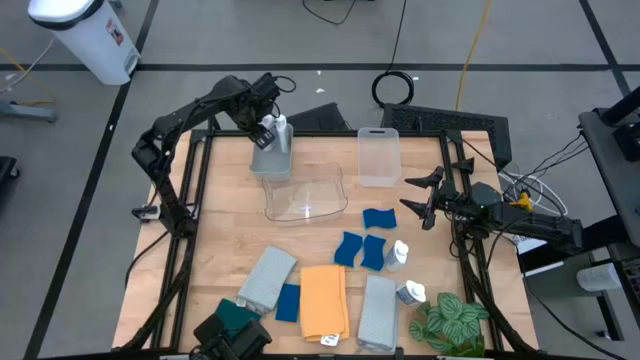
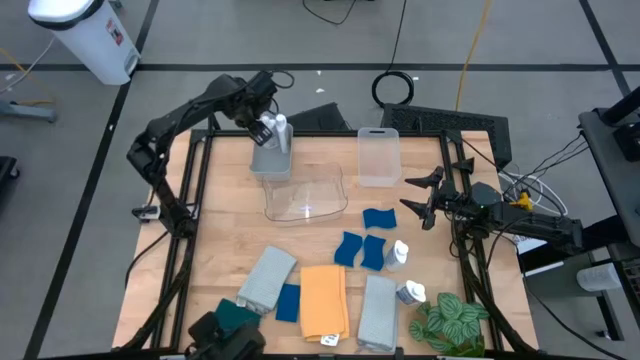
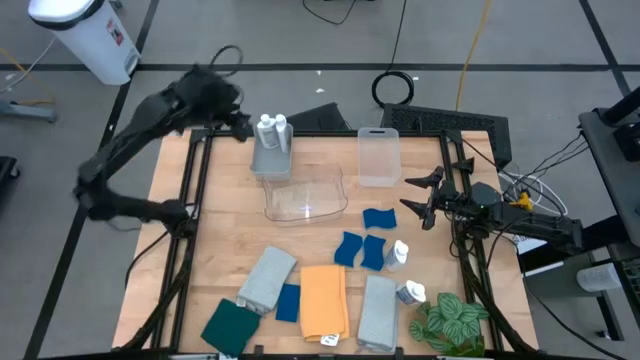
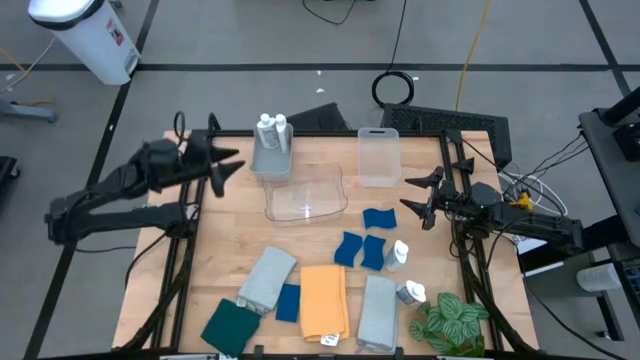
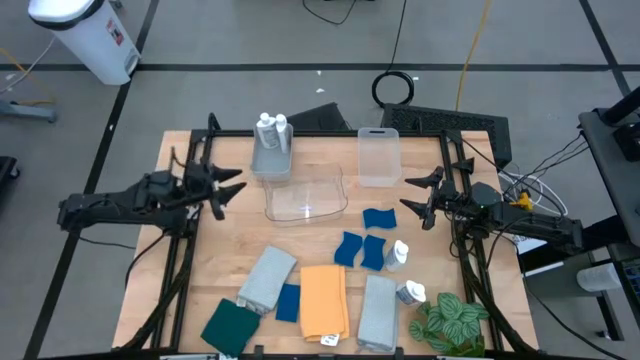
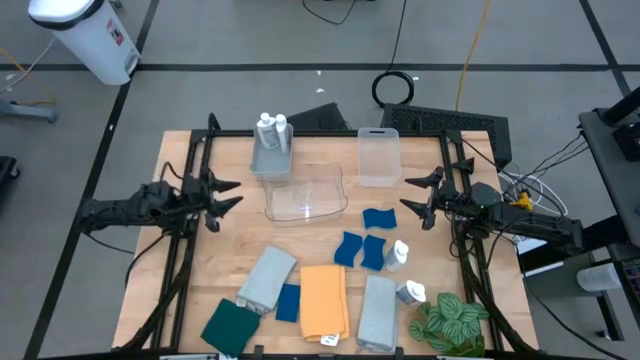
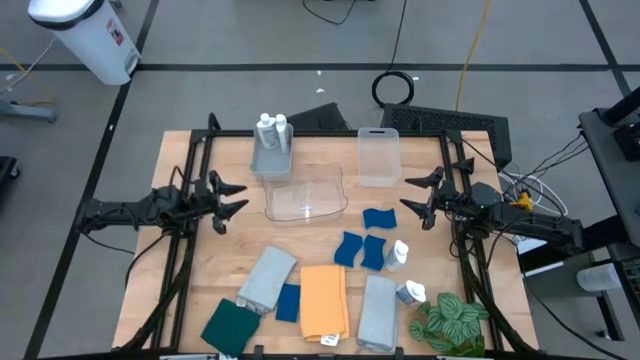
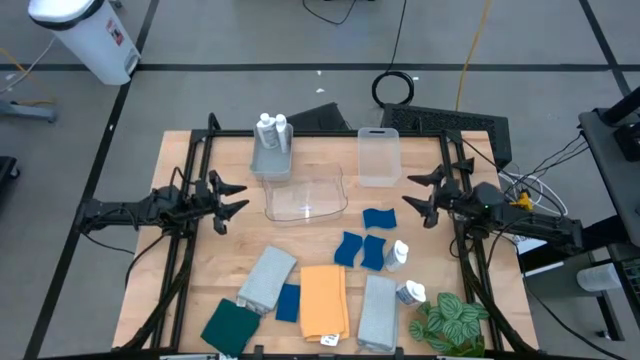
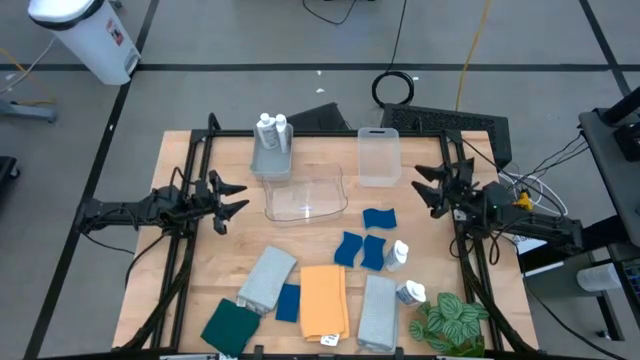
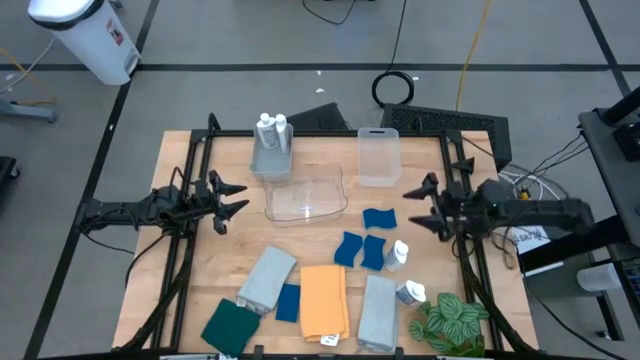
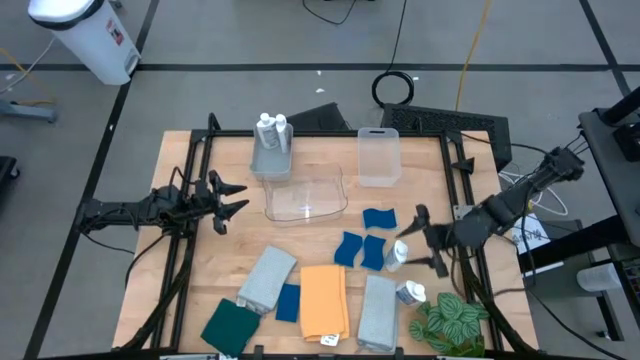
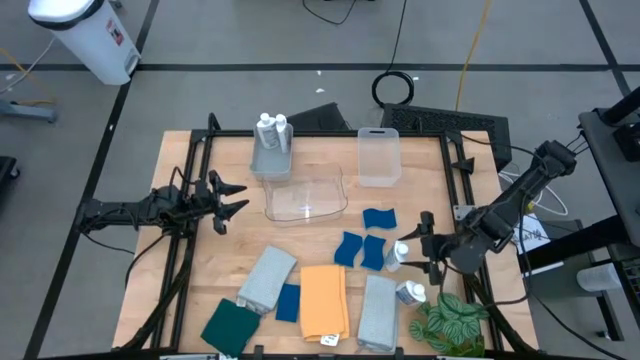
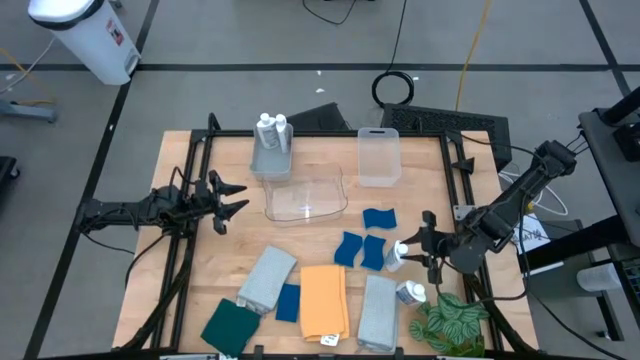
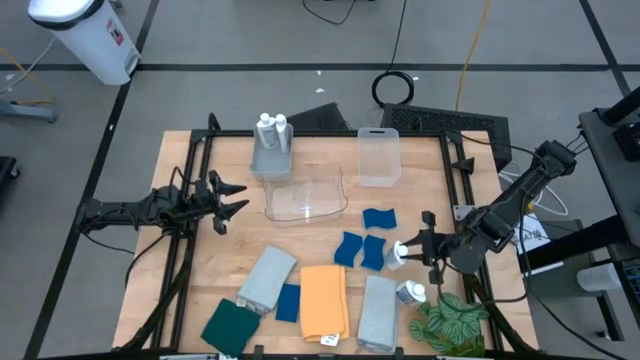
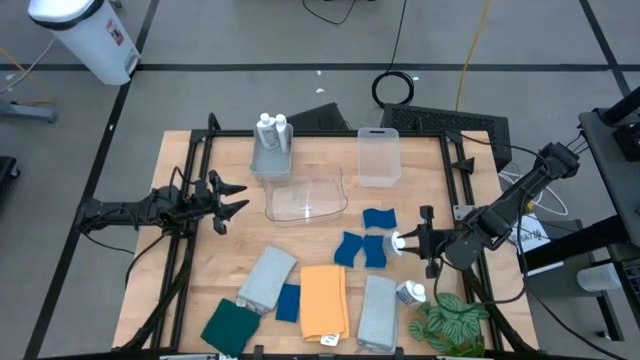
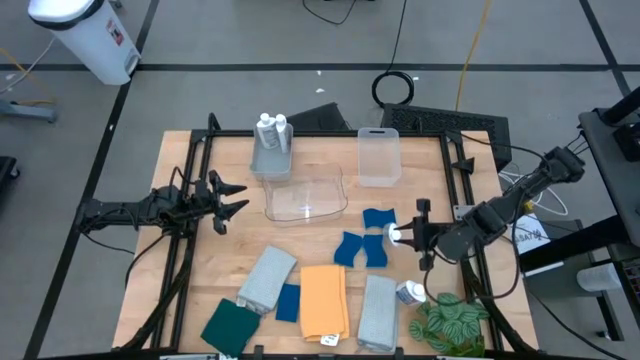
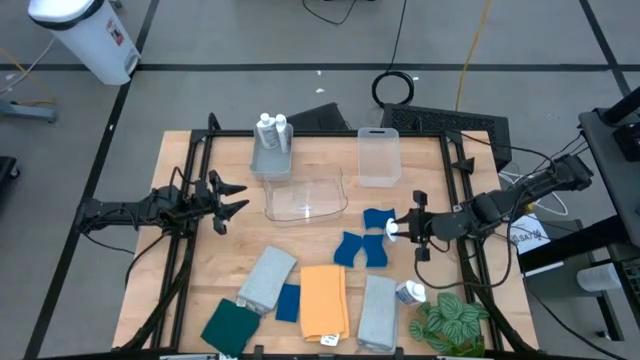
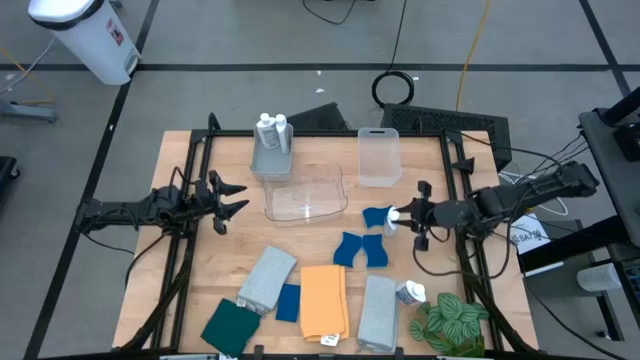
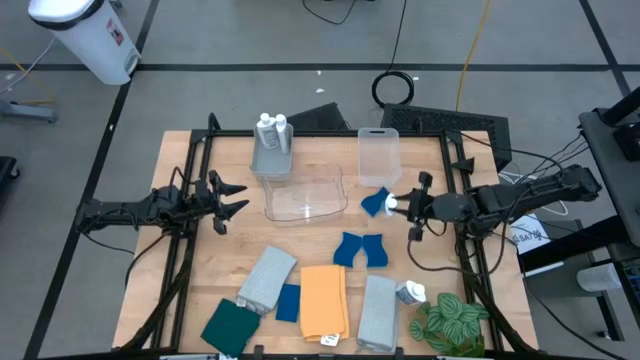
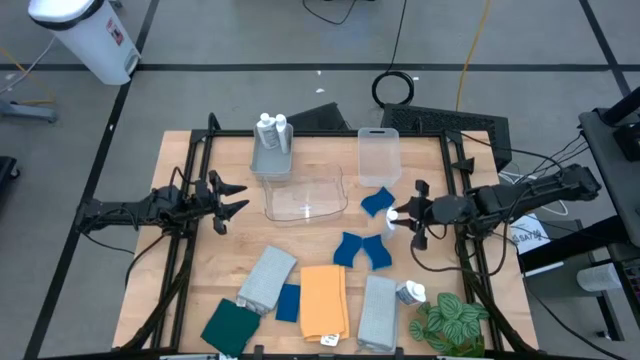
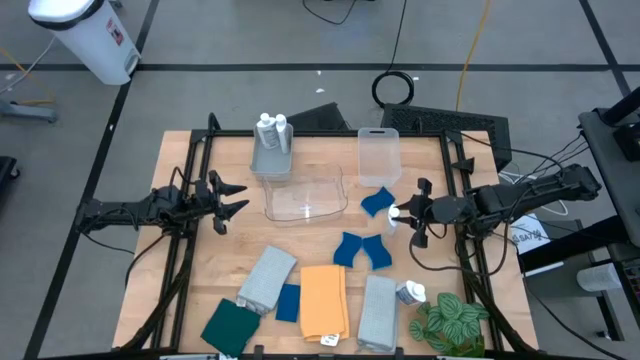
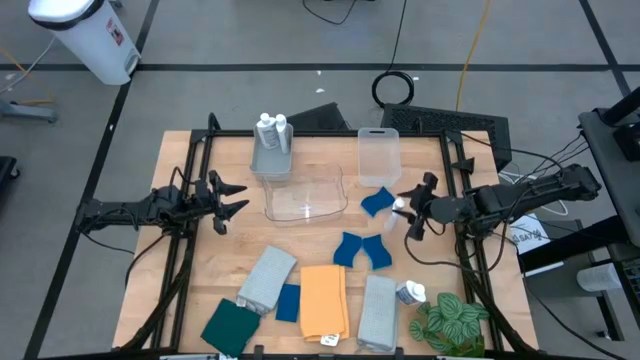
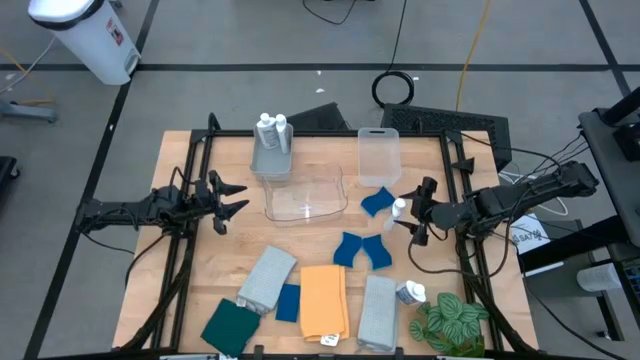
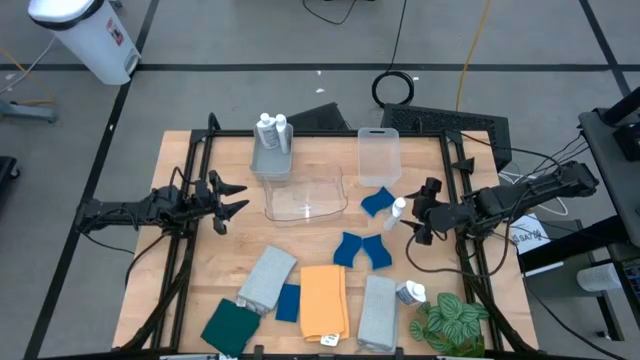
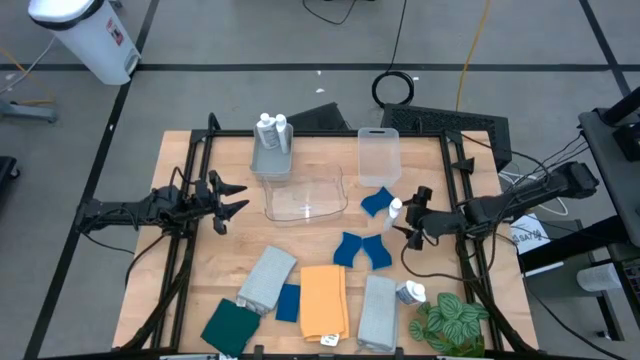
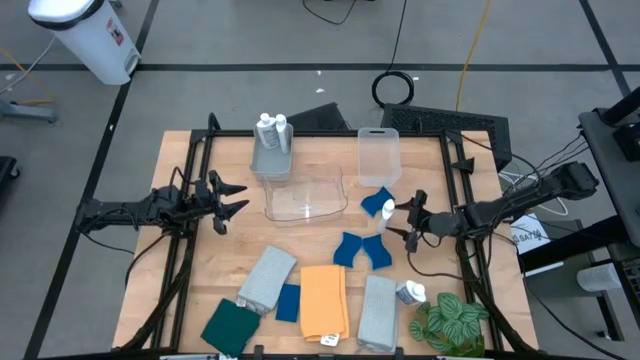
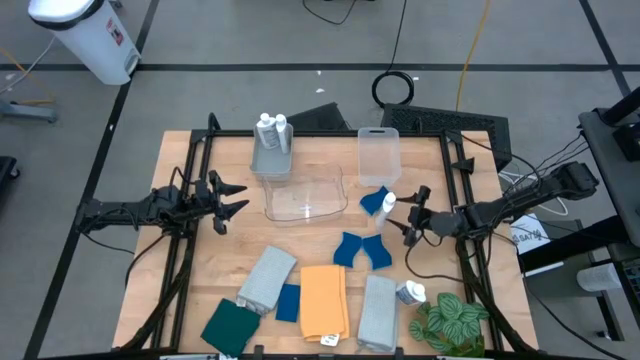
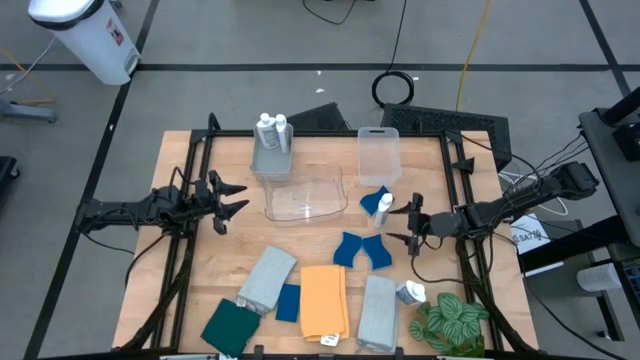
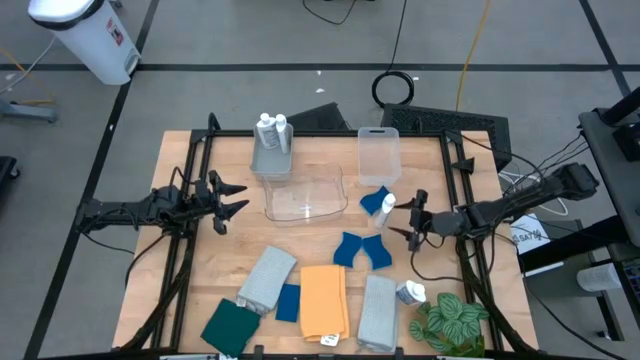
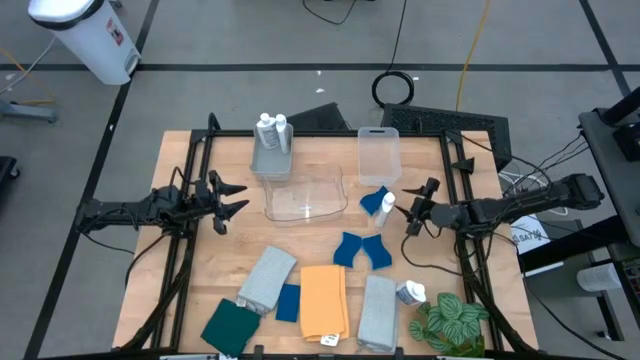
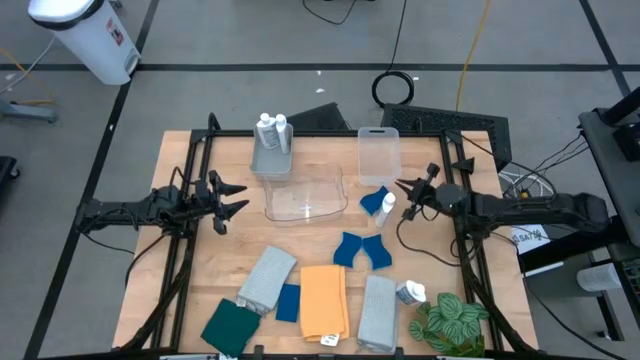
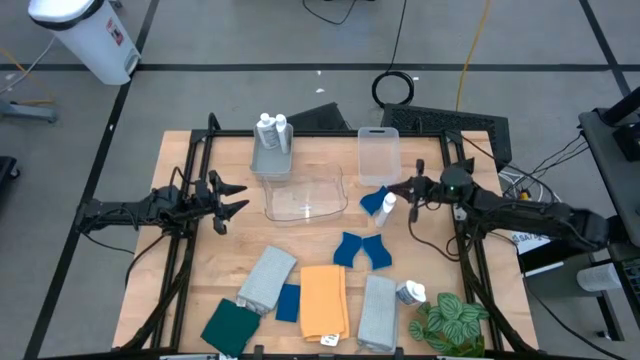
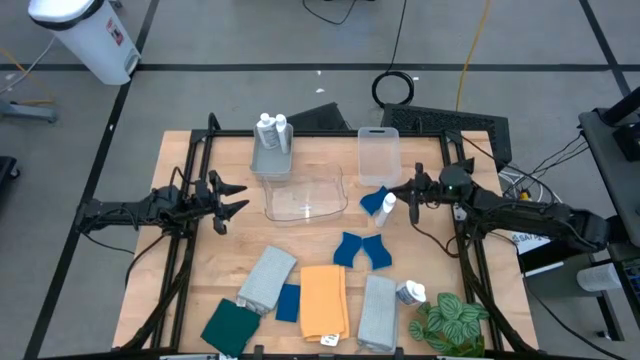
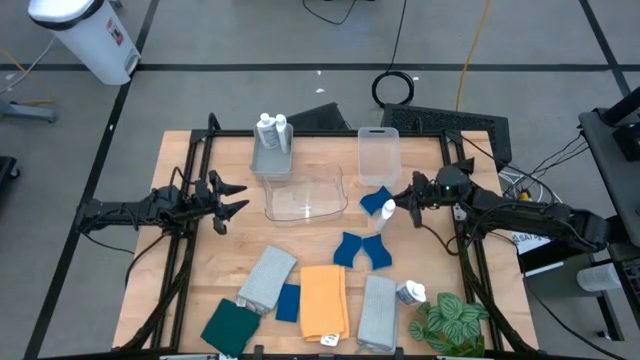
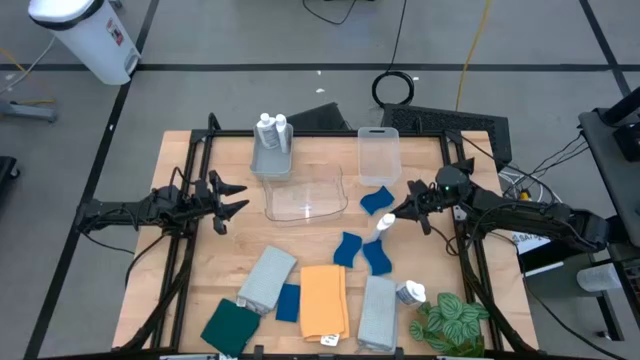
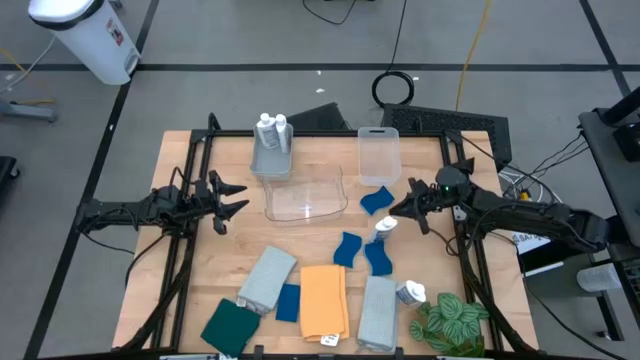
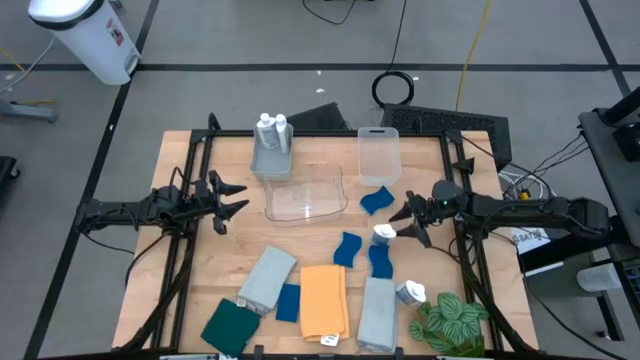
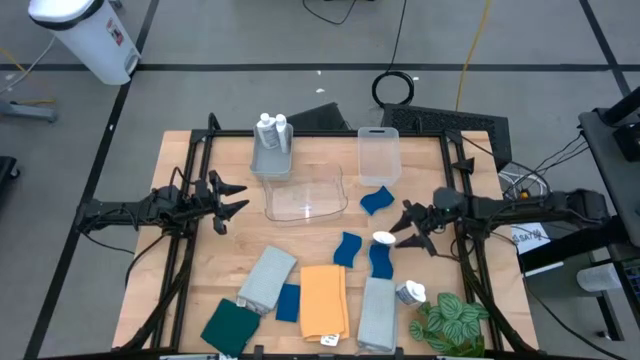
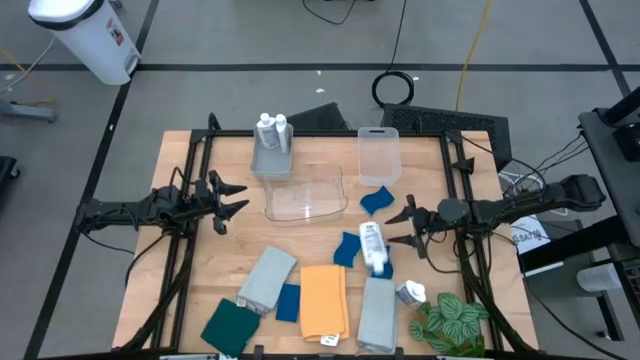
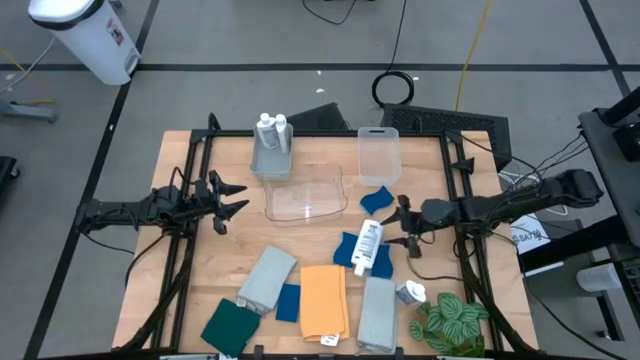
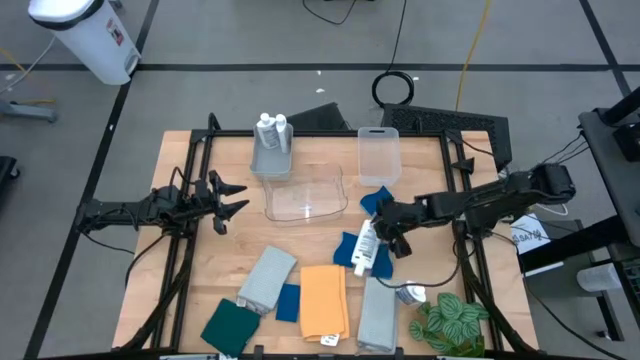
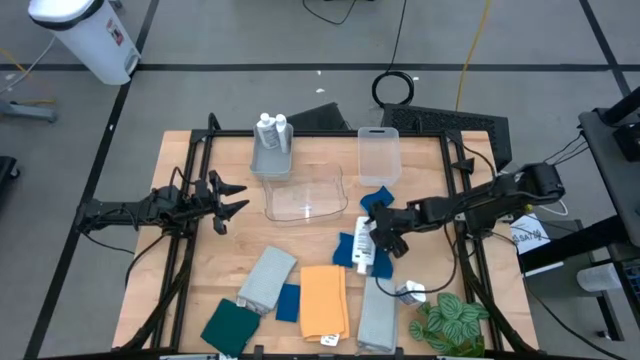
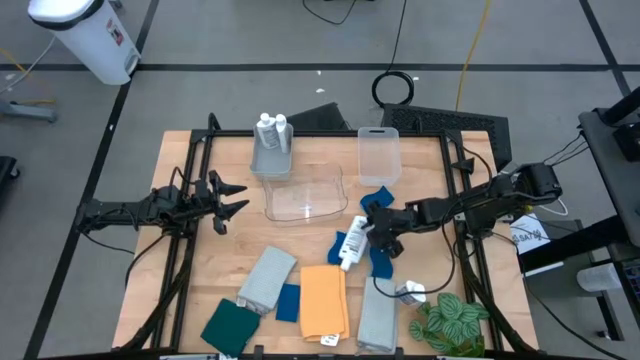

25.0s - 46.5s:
Task: Pick & Place Kitchen Items
Put the white plastic restorer bottle into the gray bin
